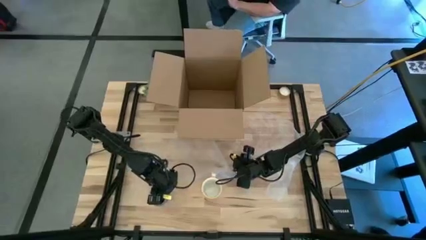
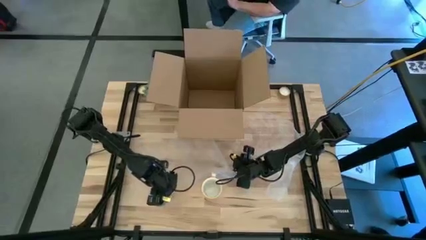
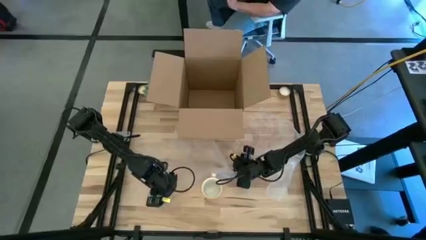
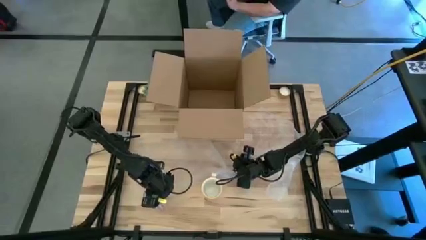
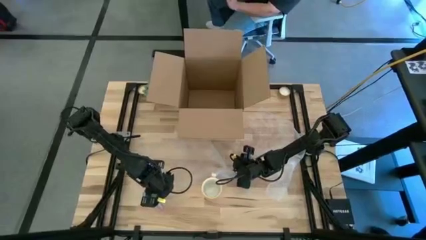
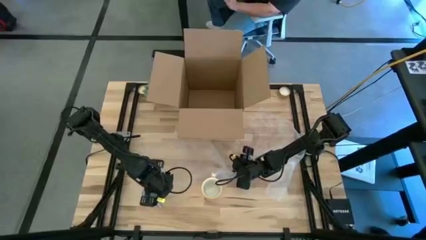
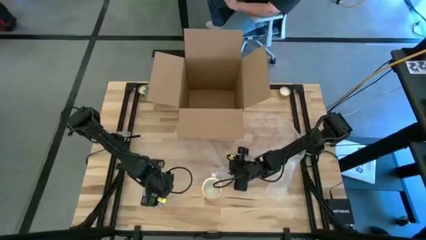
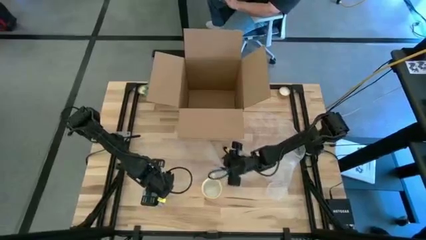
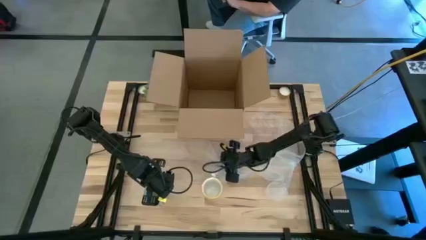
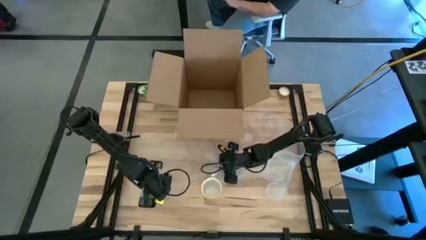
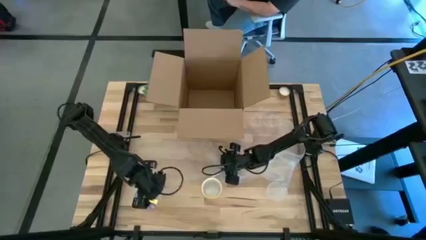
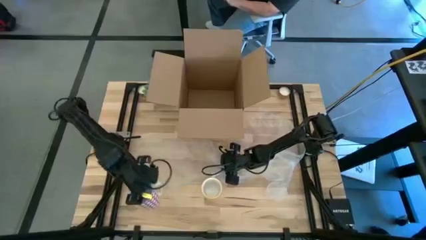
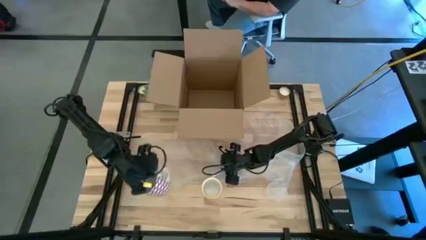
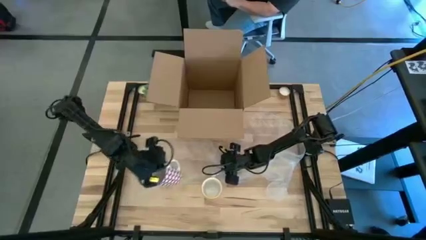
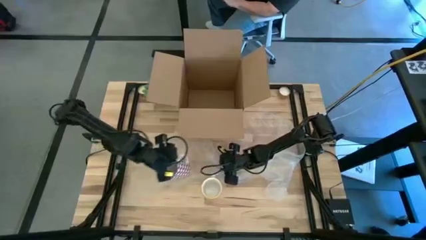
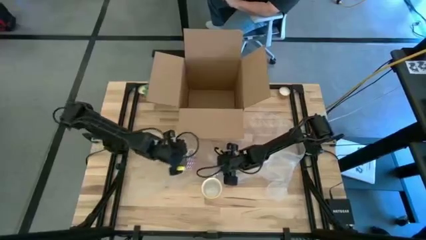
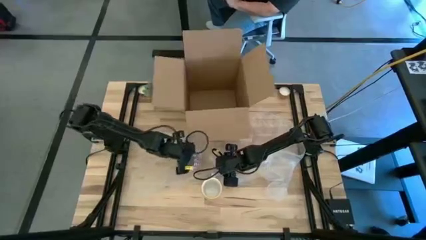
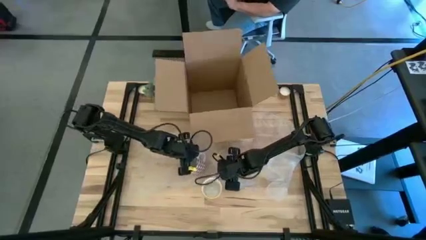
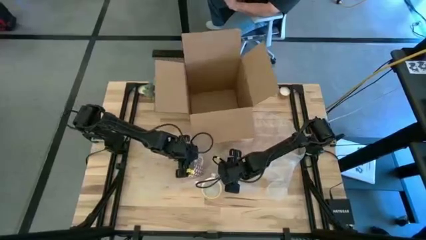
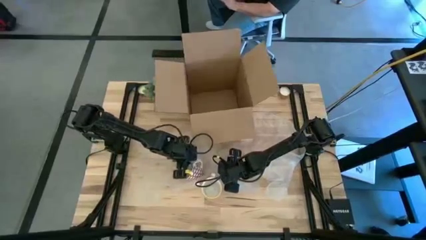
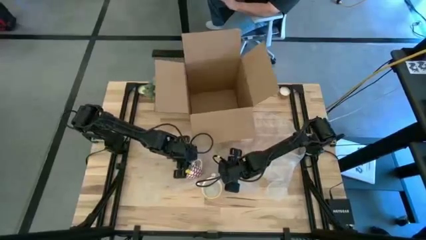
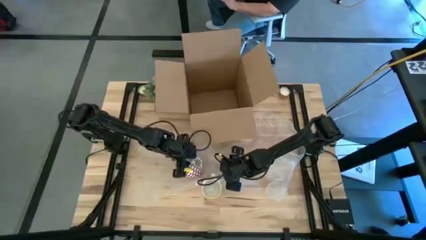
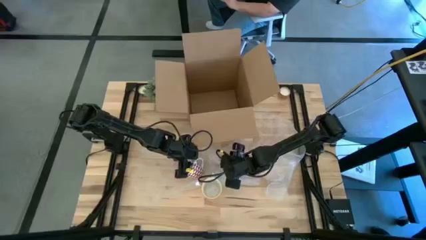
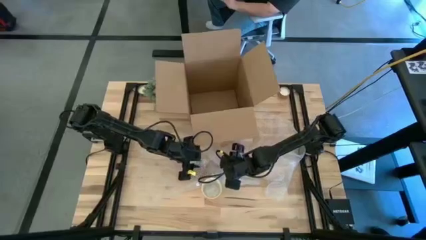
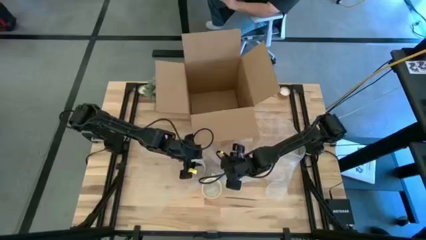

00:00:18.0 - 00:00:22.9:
Task: wrap mug
Put the red mug on the bubble wrap

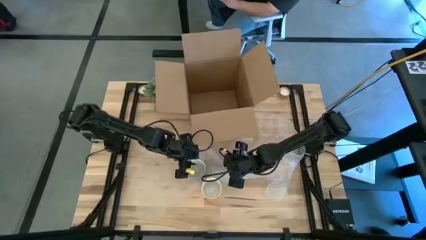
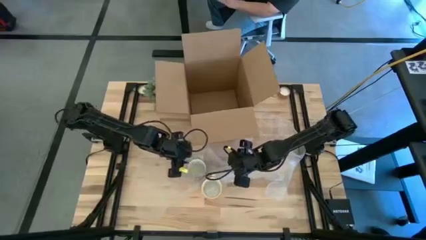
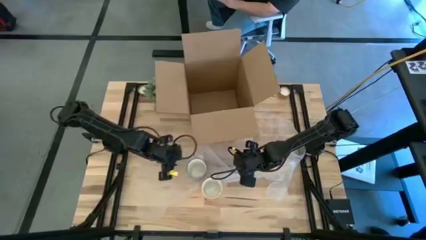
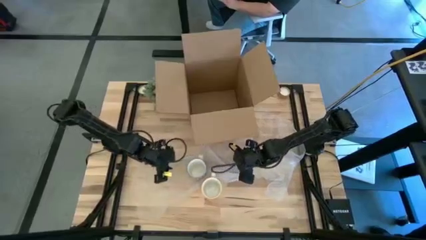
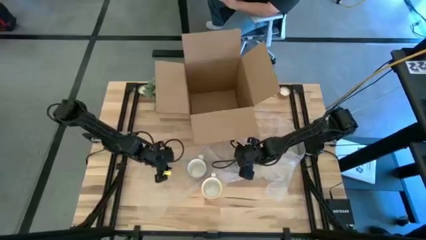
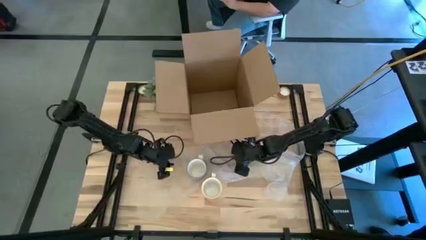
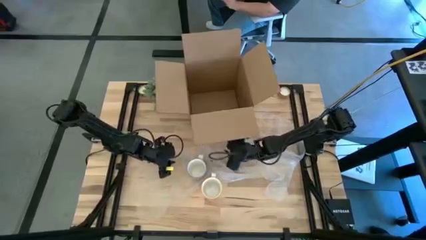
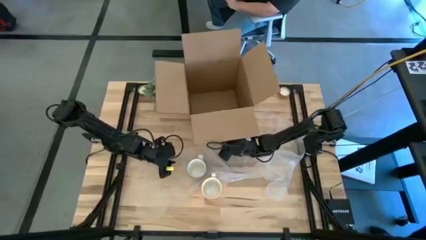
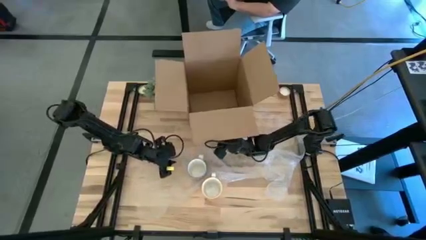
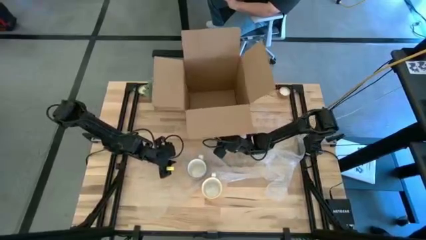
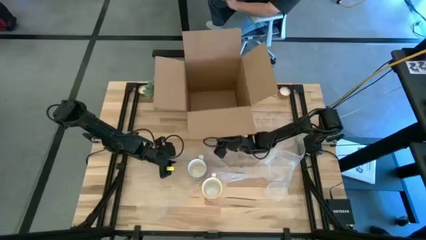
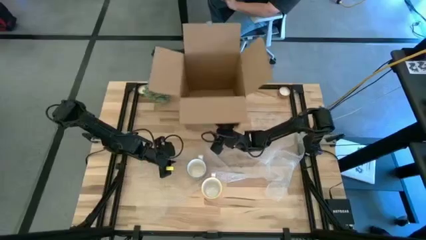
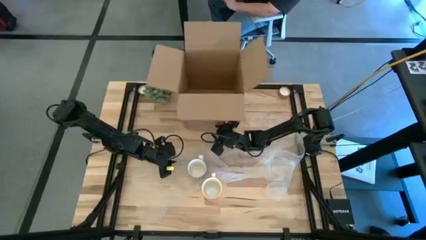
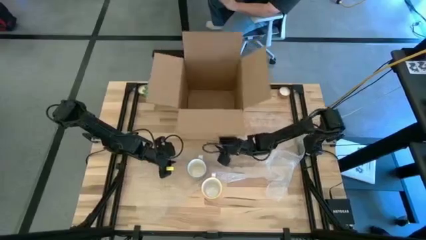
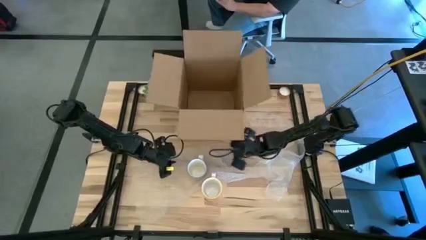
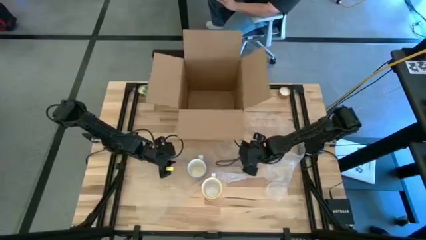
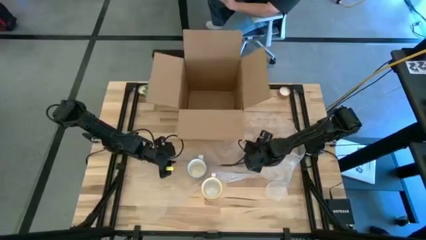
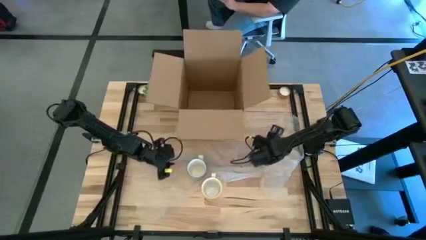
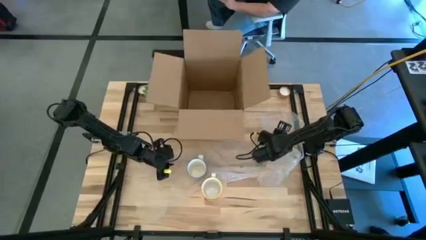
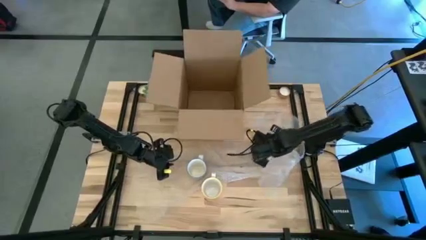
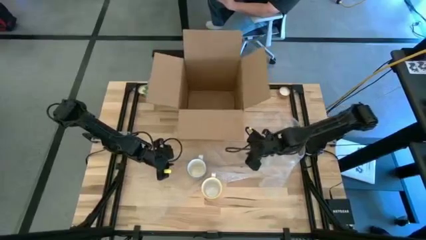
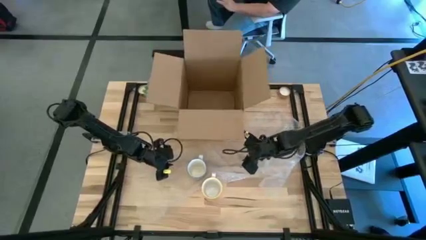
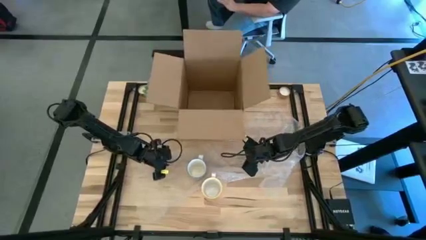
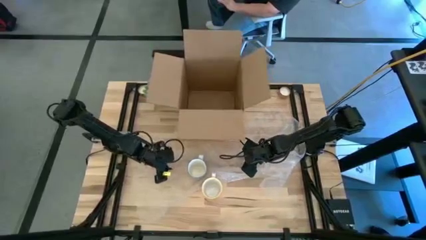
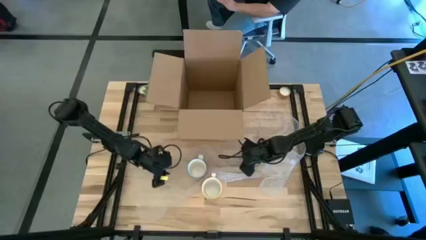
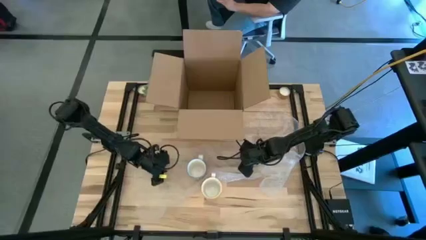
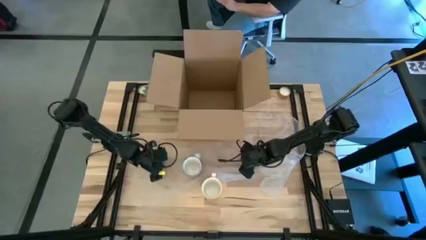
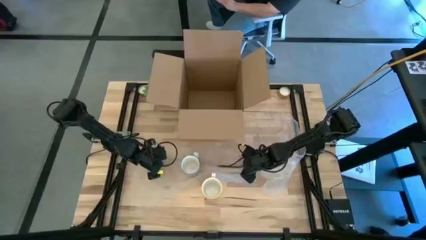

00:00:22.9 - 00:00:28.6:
Prepare the red mug on the bubble wrap

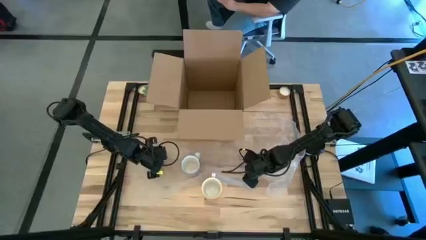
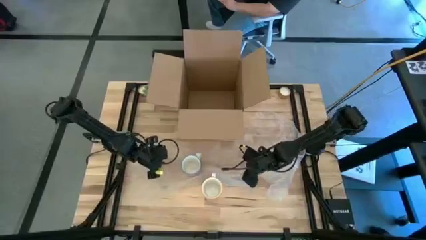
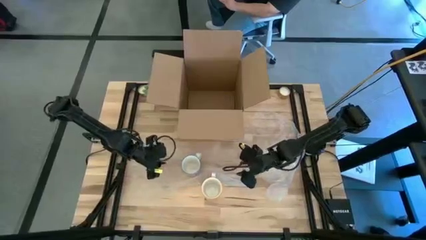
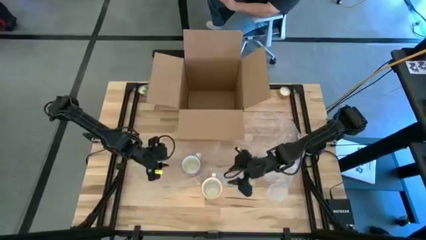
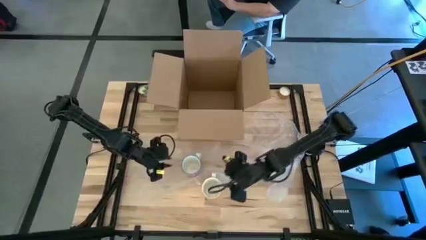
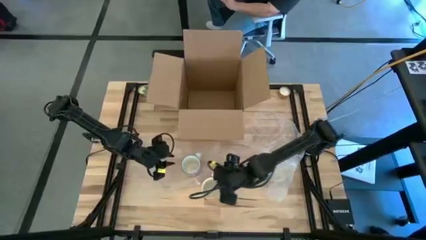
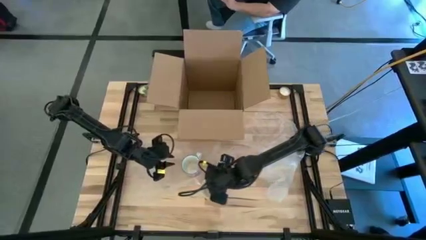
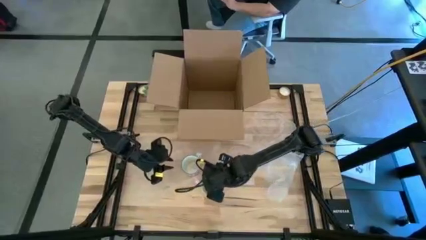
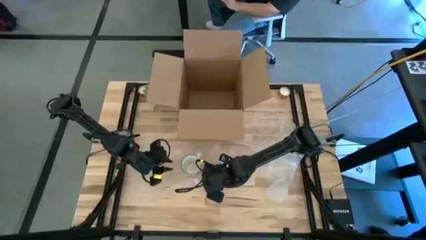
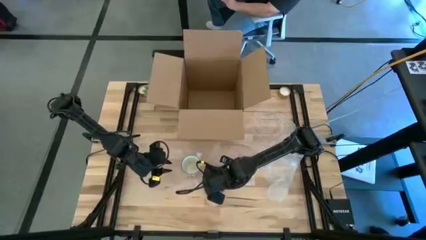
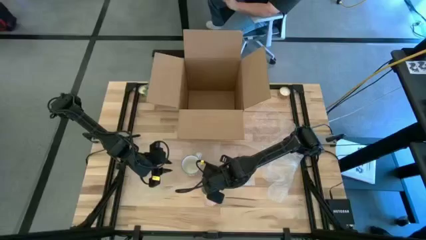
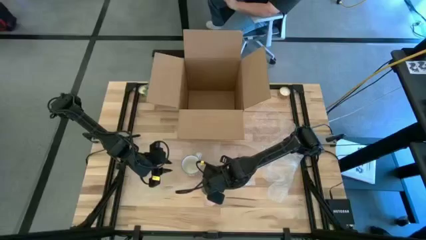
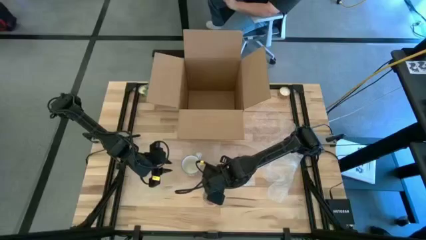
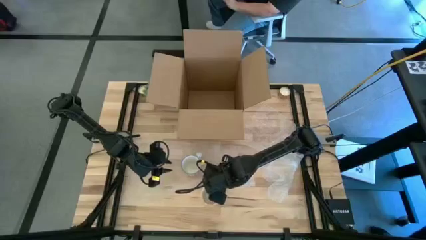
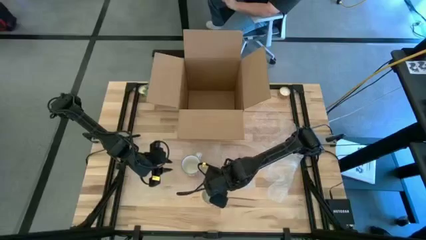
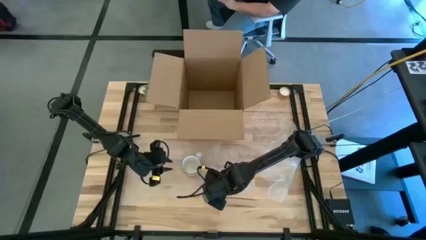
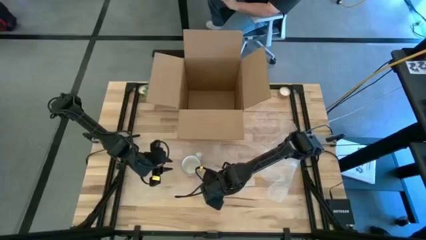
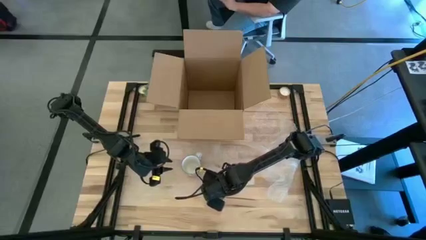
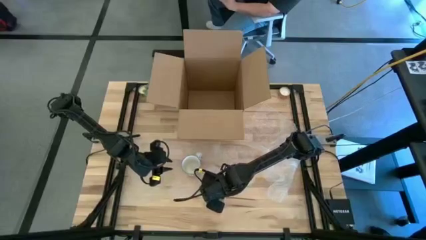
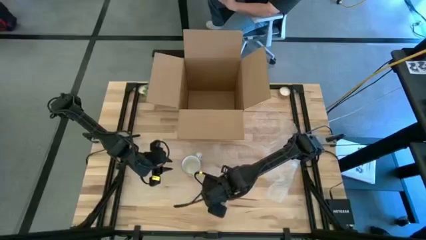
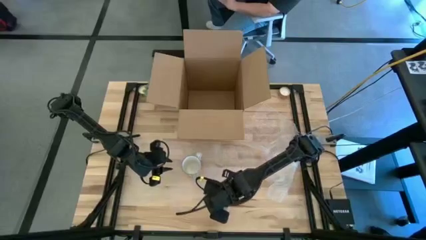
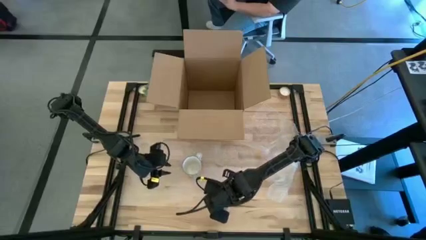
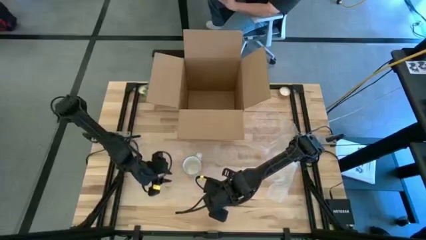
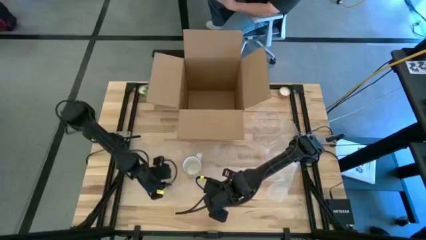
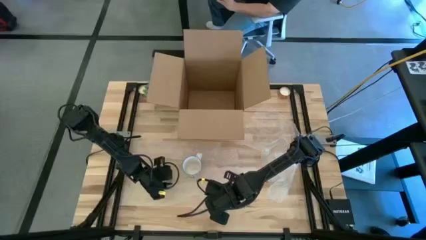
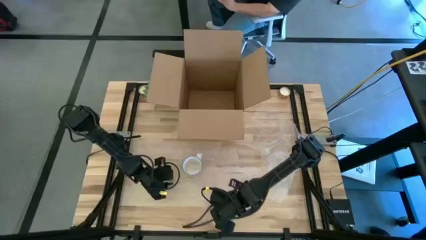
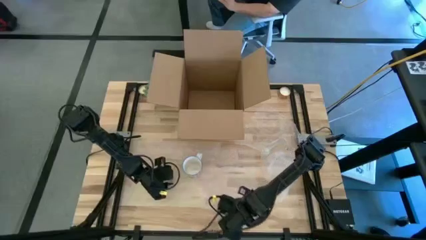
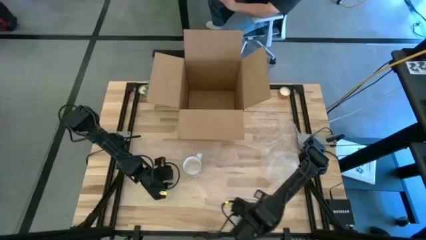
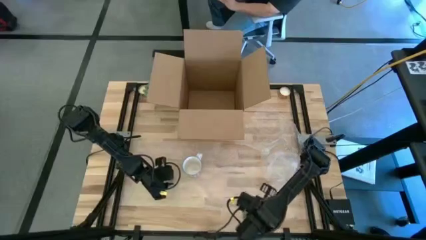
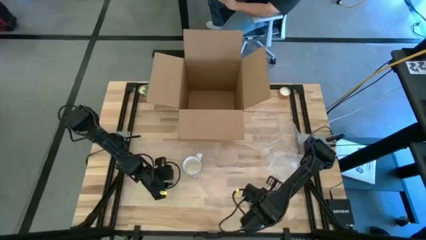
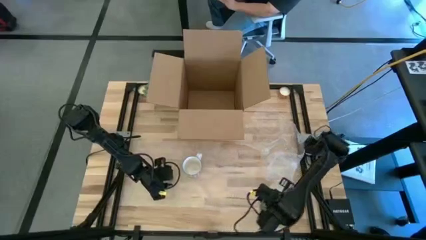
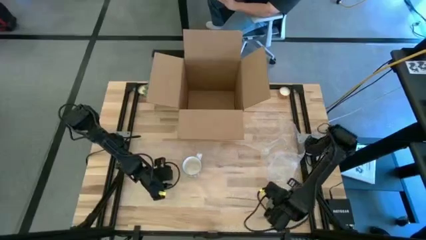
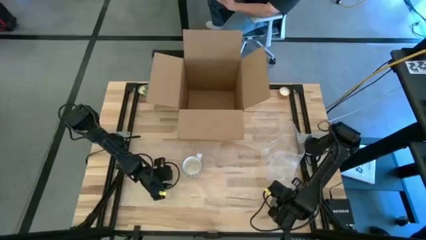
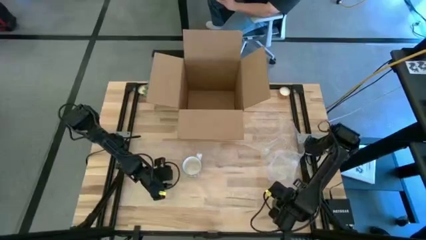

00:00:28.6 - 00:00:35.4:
Move the yellow mug
